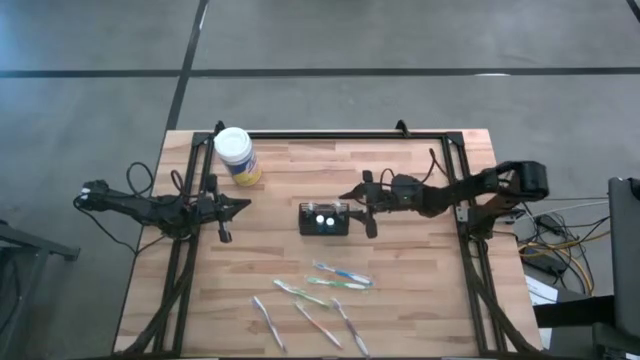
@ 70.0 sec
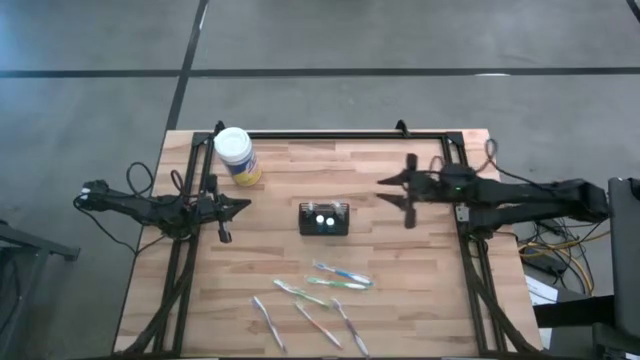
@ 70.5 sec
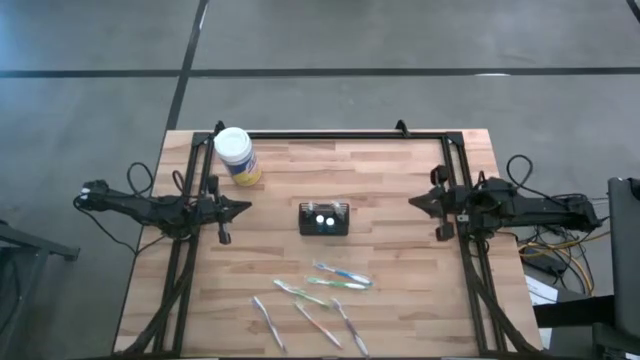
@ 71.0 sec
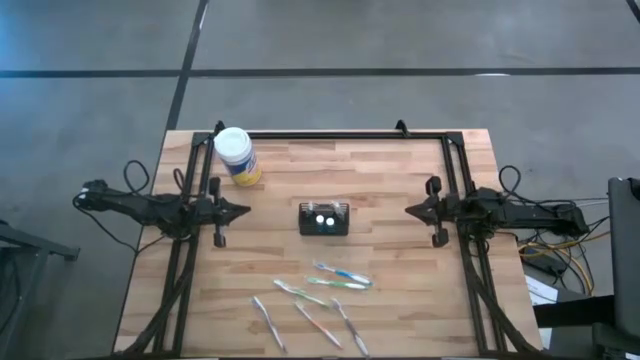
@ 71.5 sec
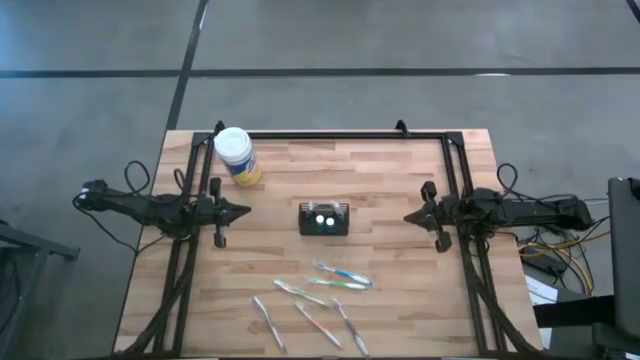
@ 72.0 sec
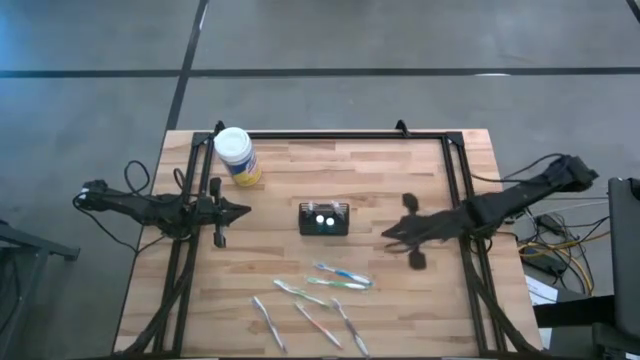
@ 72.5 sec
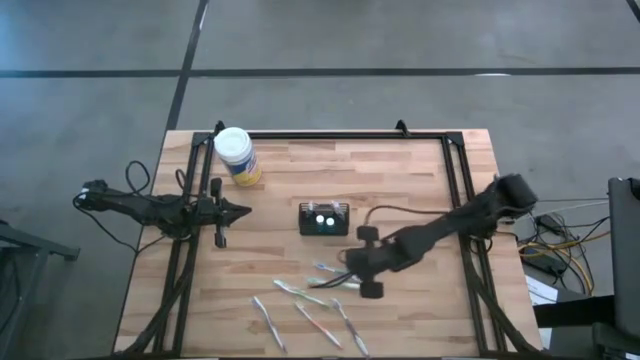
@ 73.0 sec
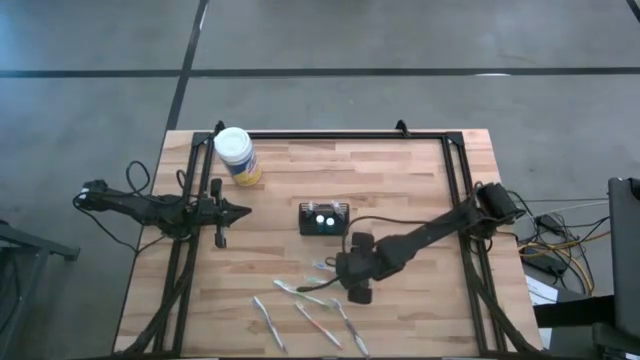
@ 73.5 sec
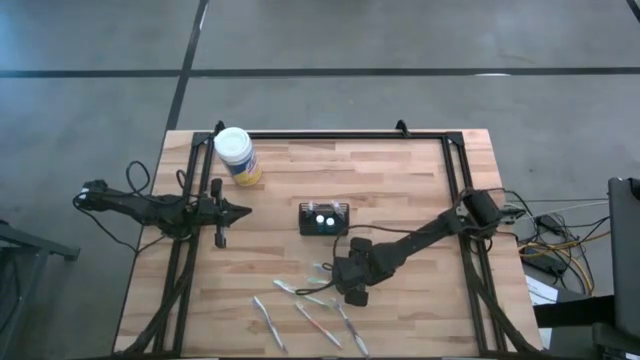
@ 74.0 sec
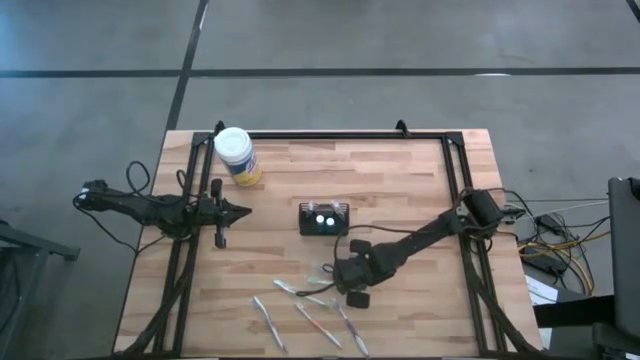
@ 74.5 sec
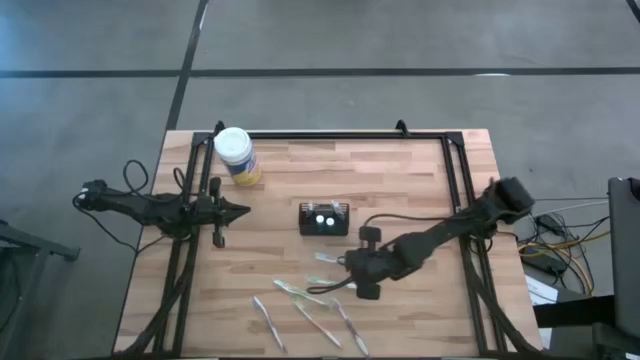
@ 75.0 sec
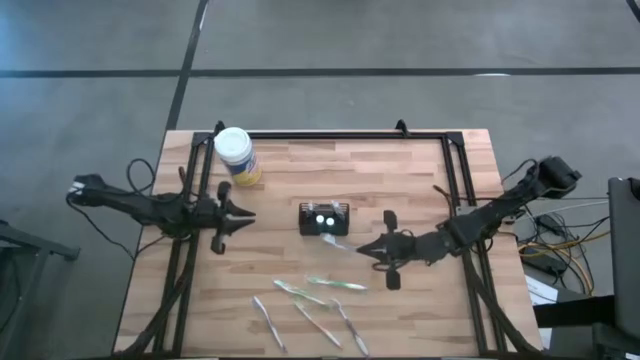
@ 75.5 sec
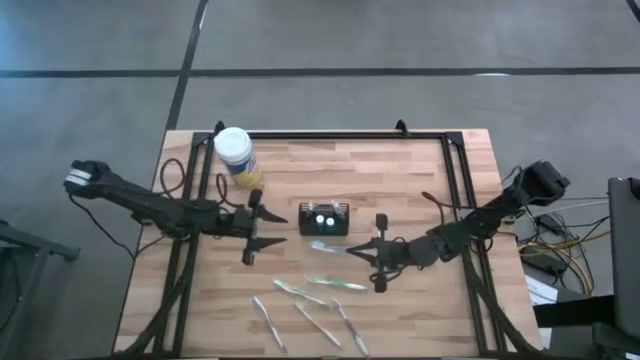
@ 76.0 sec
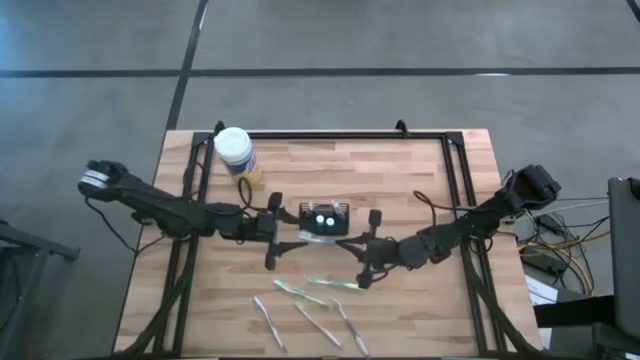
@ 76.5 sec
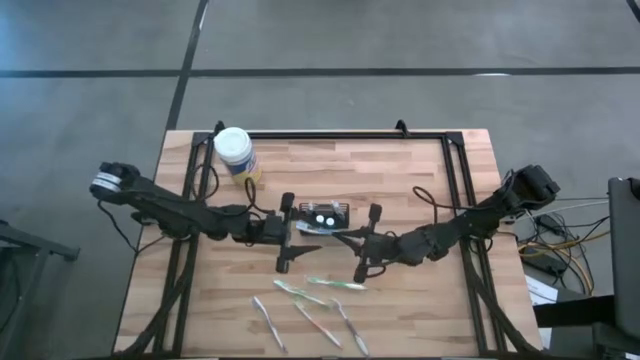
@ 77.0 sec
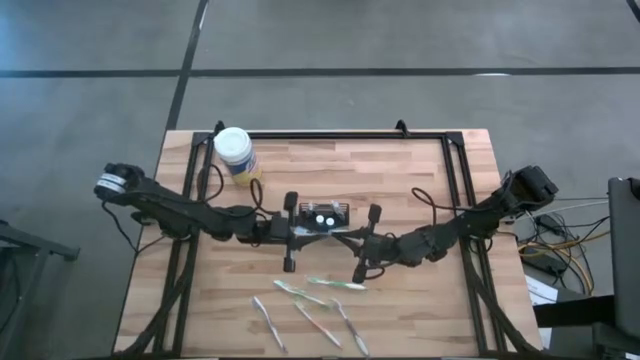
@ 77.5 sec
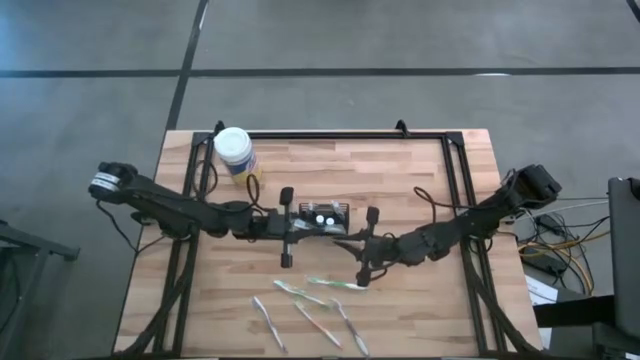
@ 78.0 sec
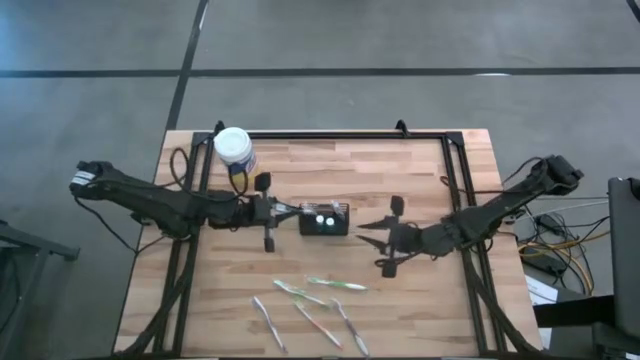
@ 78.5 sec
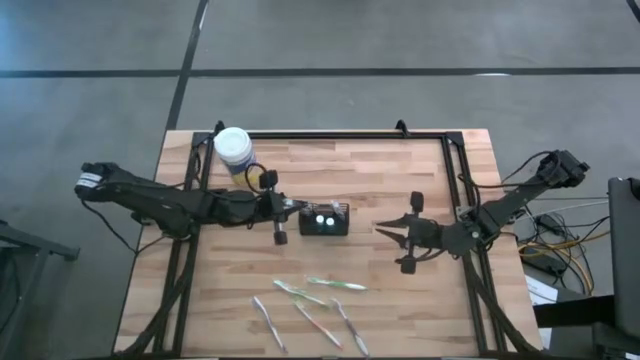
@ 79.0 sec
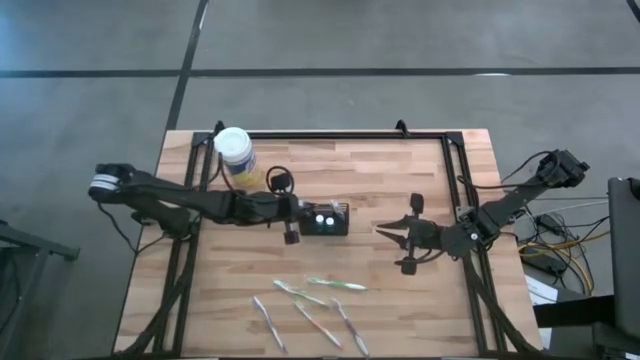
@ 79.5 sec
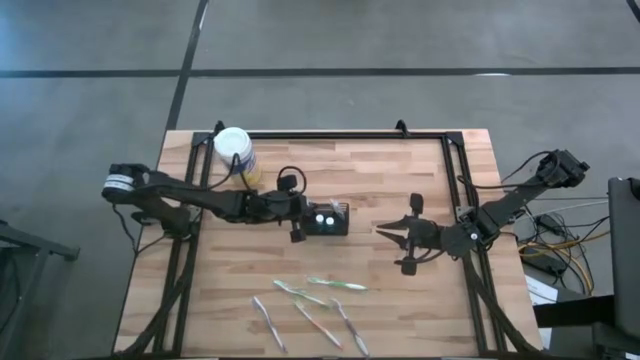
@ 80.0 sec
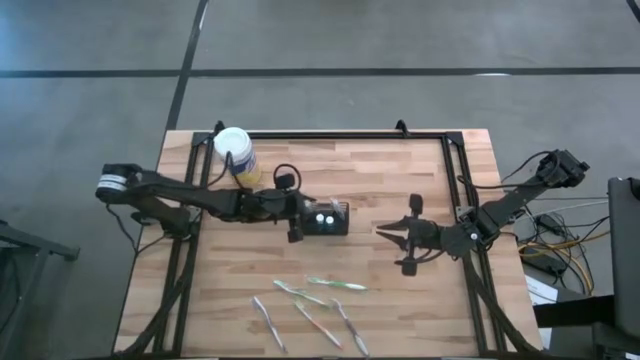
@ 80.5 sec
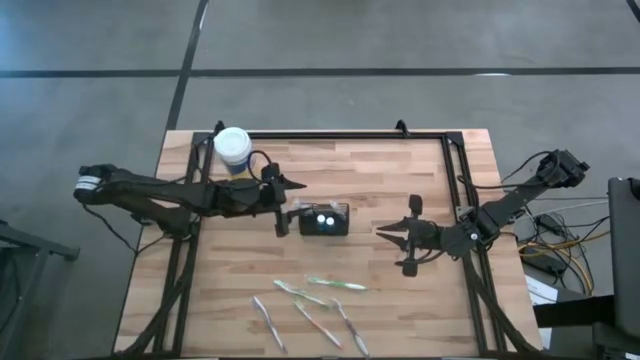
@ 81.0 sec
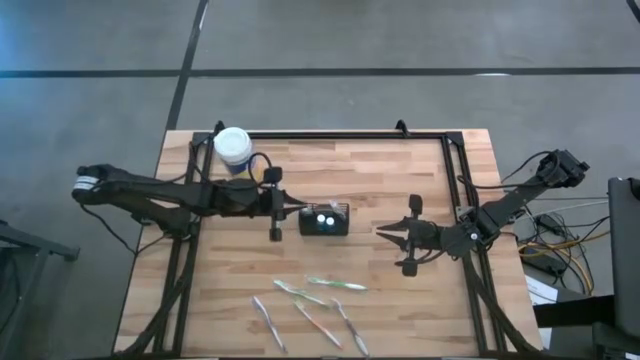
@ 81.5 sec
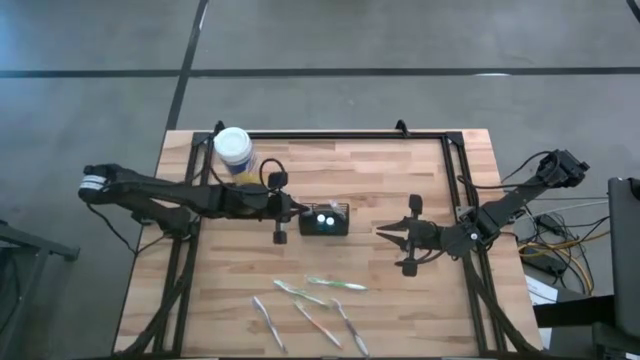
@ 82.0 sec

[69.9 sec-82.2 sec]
Task: Pick & Place toothbrushing station
Put the blue toothbrush into the mesh organizer

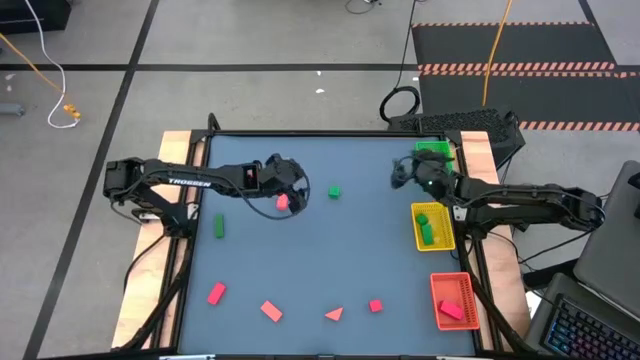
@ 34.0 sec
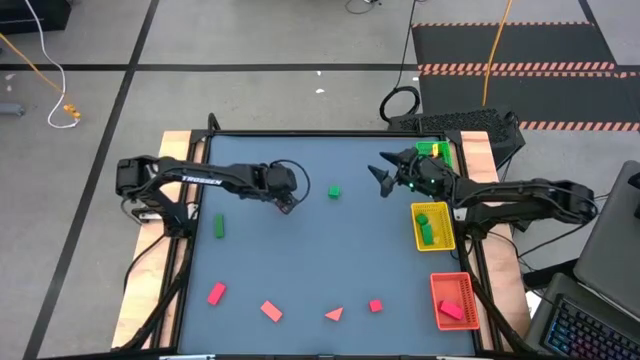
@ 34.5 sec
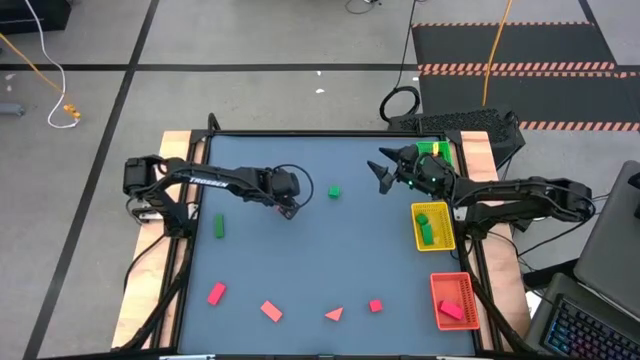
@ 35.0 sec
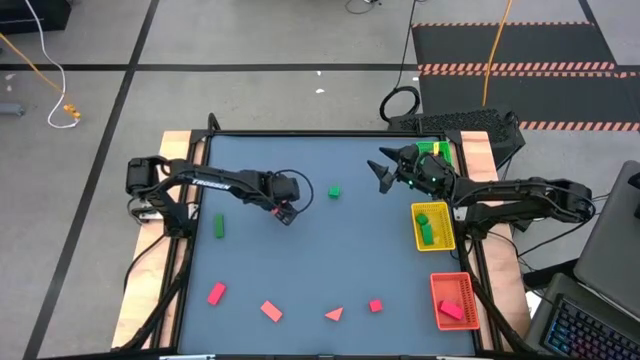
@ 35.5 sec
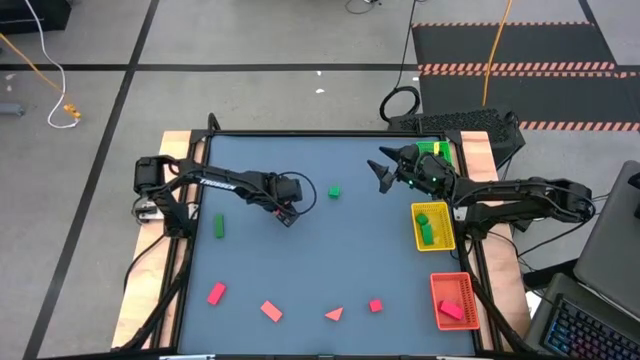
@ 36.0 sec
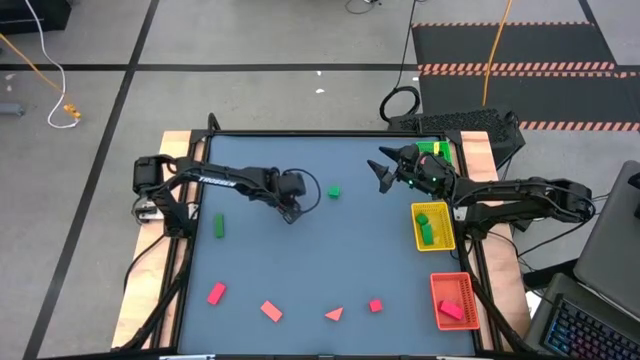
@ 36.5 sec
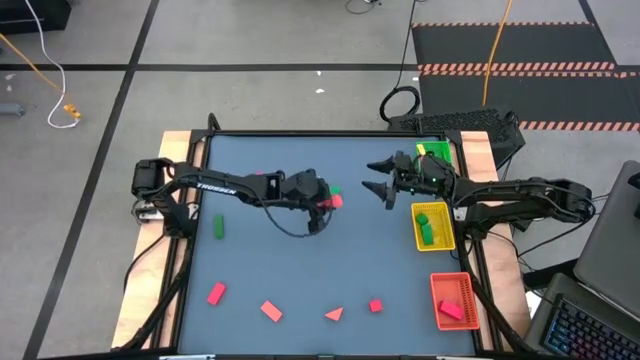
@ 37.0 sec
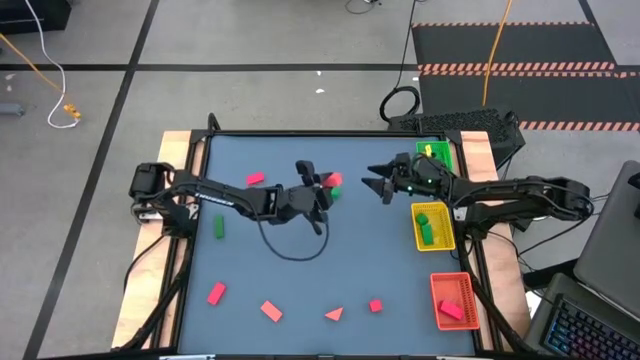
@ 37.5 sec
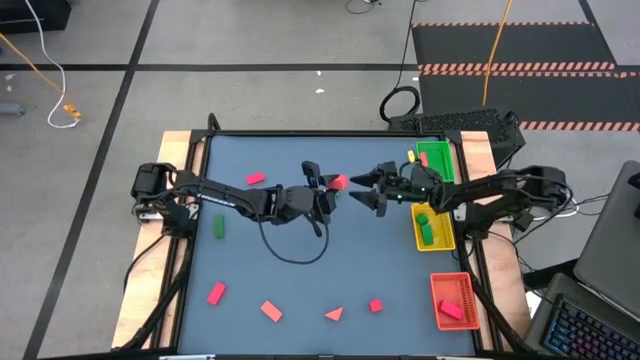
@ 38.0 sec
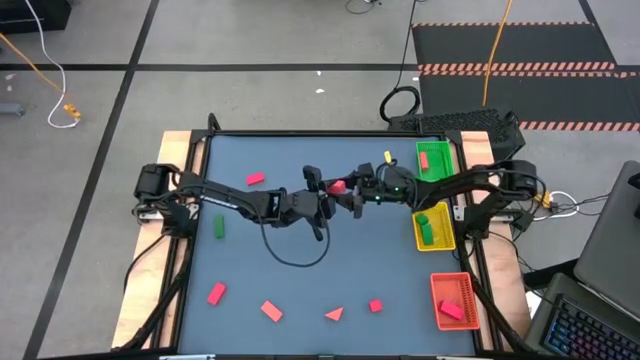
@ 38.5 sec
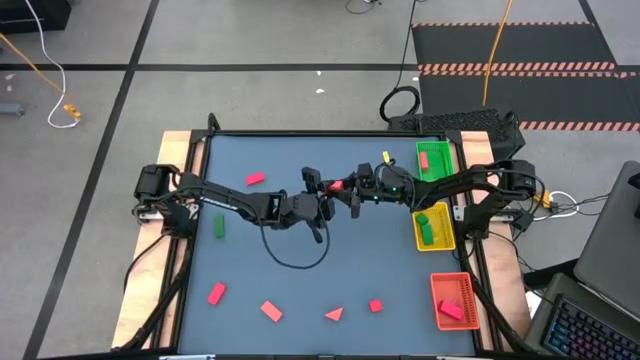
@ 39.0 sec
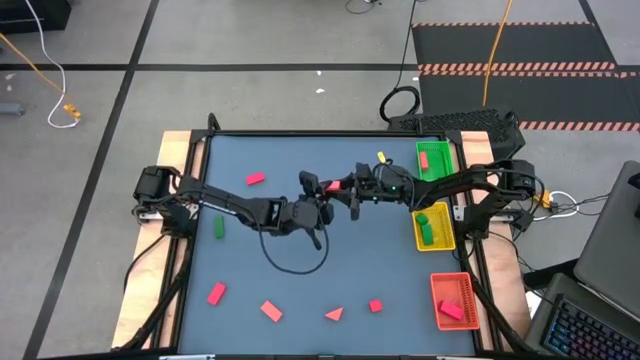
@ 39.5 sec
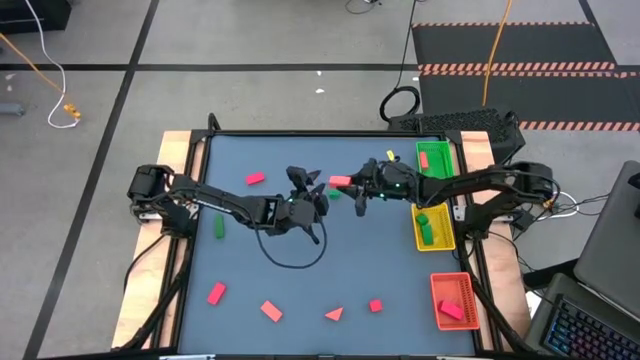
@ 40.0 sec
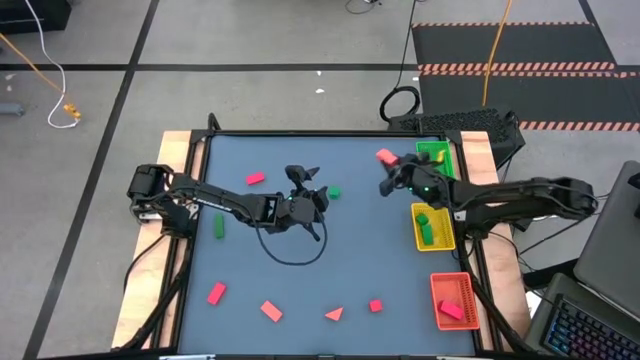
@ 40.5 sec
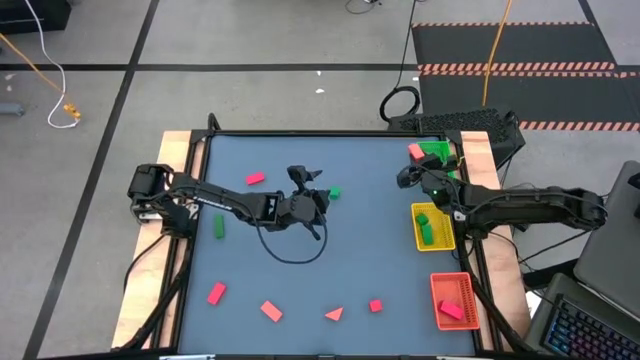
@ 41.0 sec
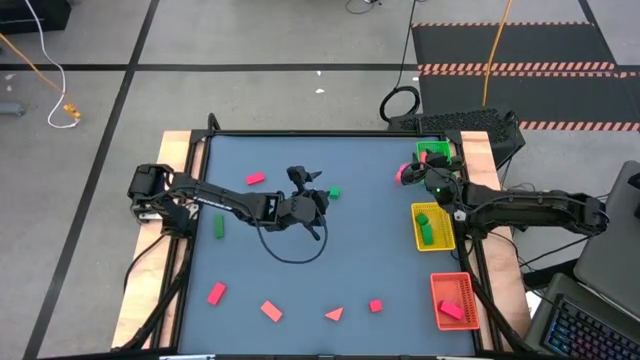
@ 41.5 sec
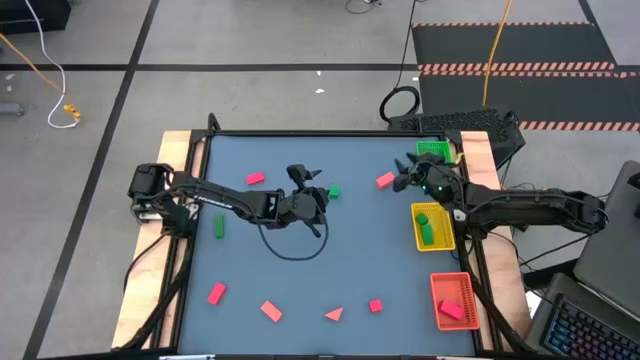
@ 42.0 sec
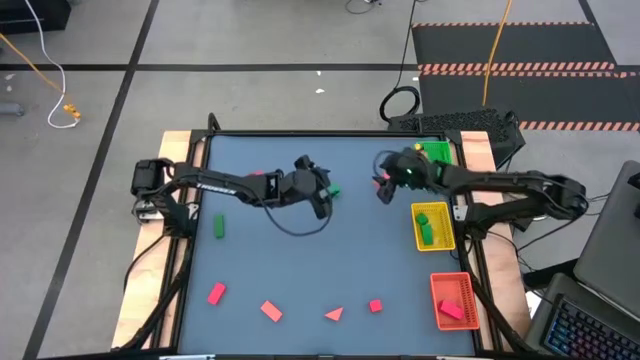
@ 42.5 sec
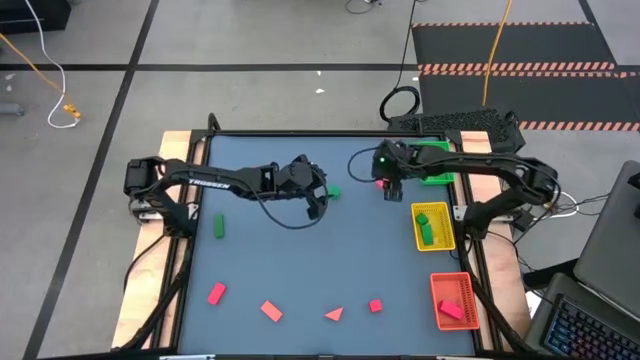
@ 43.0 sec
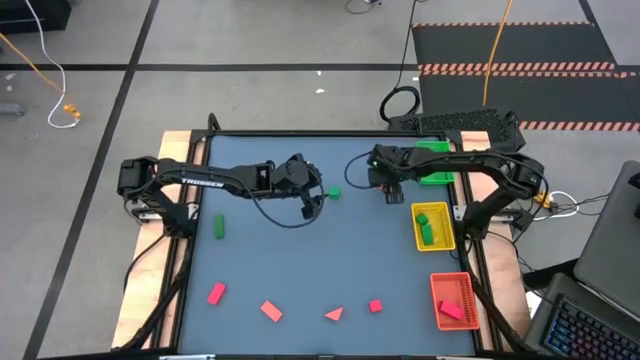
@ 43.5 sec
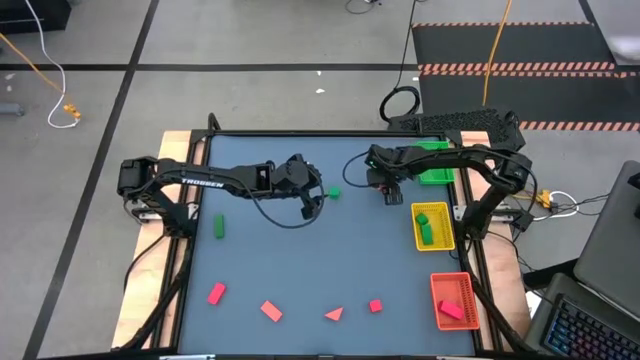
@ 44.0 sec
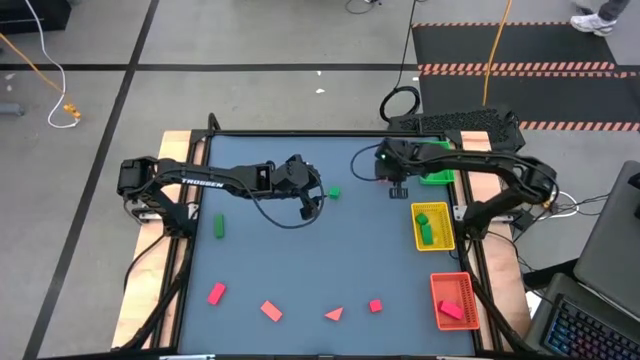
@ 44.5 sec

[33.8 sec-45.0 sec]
Task: Sort & place blocks by color
Put top left orange block into the green basket
